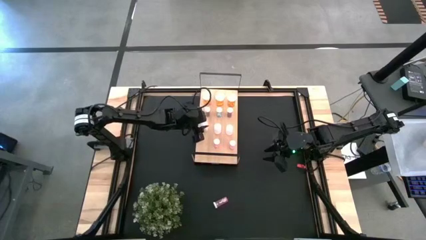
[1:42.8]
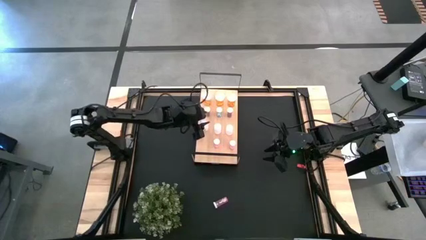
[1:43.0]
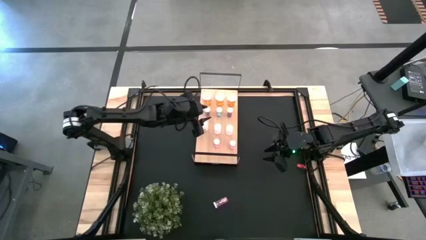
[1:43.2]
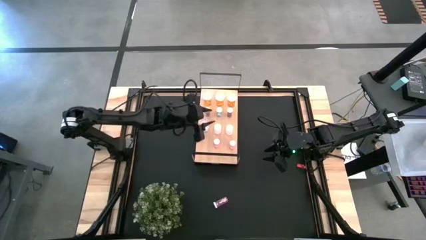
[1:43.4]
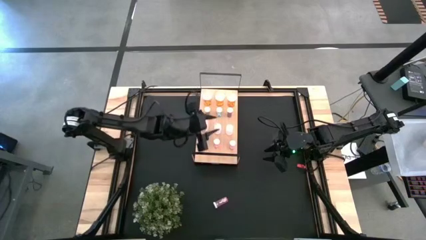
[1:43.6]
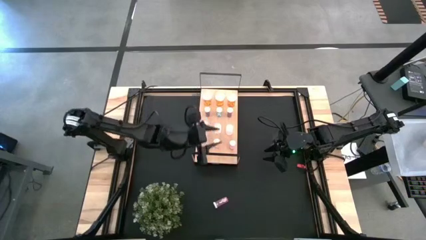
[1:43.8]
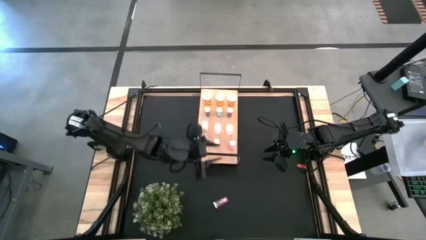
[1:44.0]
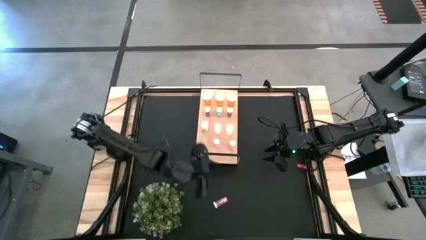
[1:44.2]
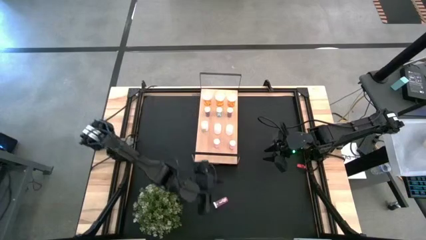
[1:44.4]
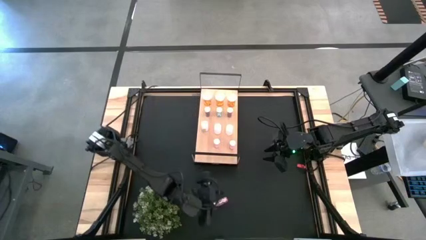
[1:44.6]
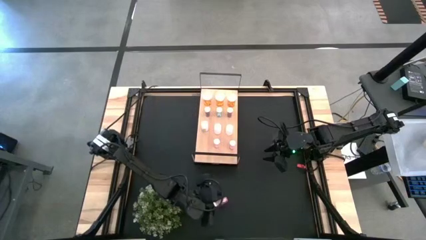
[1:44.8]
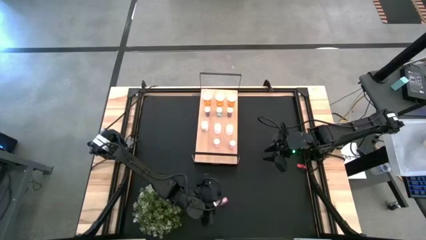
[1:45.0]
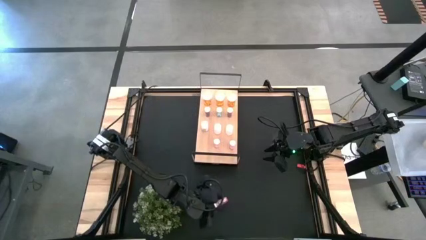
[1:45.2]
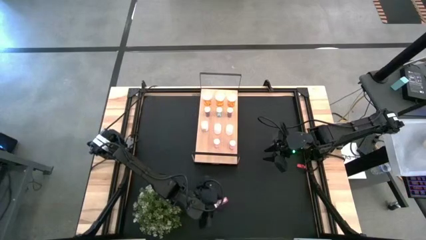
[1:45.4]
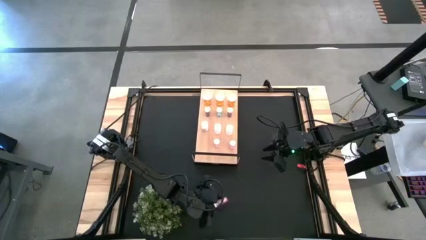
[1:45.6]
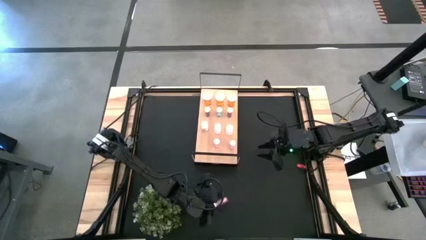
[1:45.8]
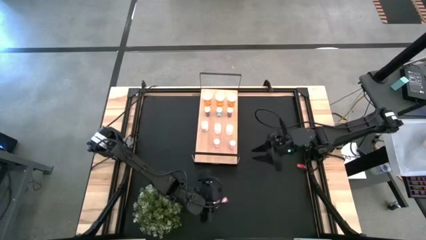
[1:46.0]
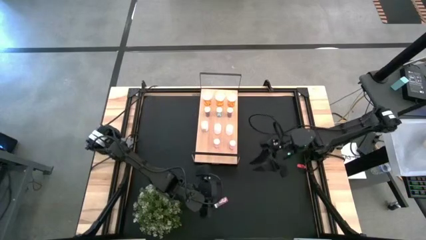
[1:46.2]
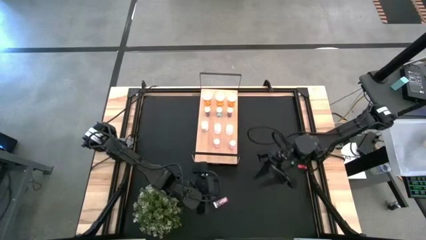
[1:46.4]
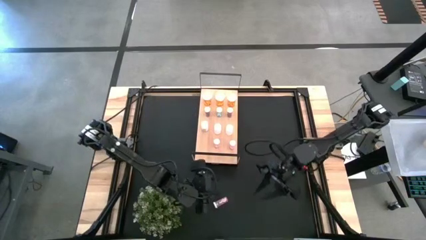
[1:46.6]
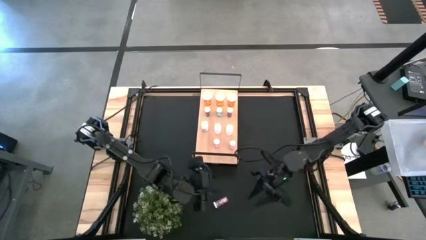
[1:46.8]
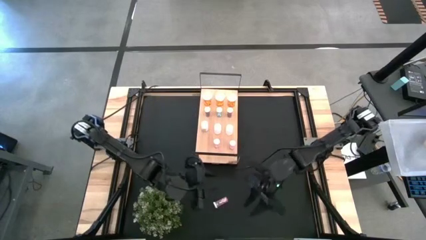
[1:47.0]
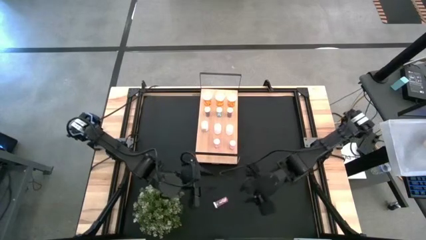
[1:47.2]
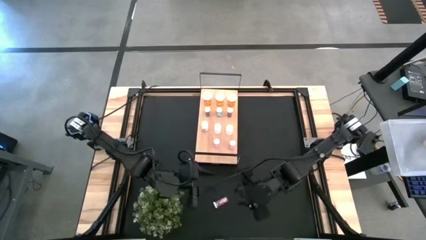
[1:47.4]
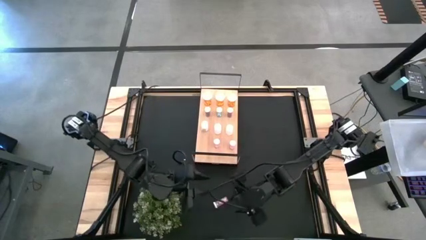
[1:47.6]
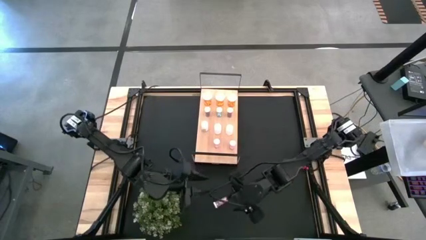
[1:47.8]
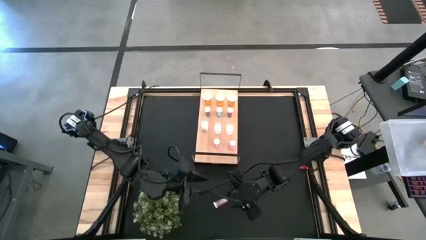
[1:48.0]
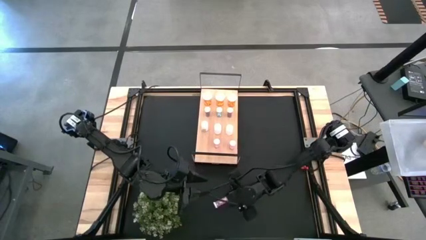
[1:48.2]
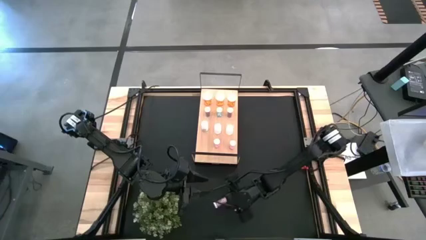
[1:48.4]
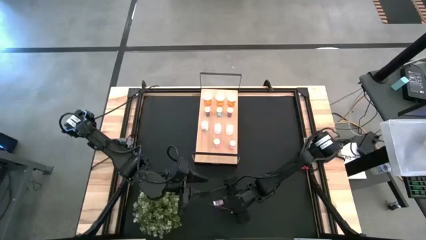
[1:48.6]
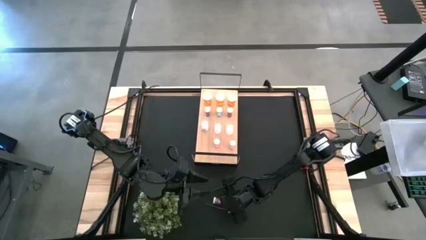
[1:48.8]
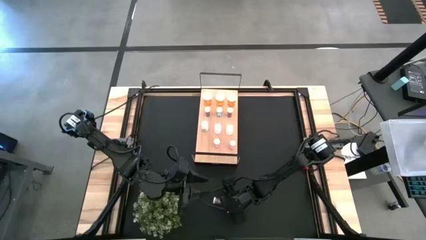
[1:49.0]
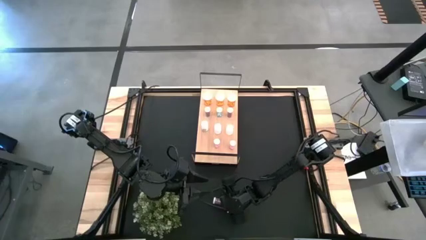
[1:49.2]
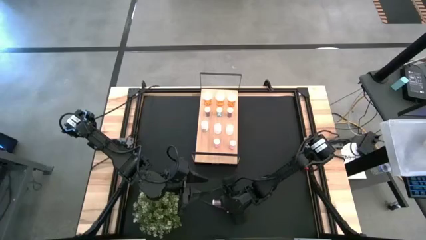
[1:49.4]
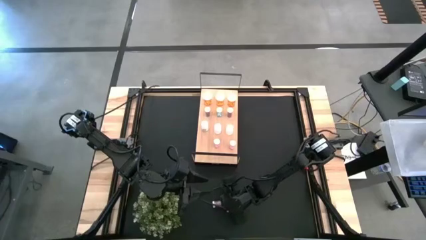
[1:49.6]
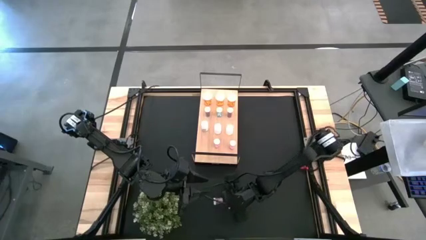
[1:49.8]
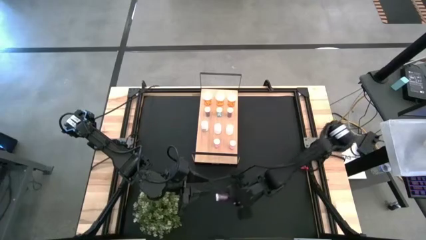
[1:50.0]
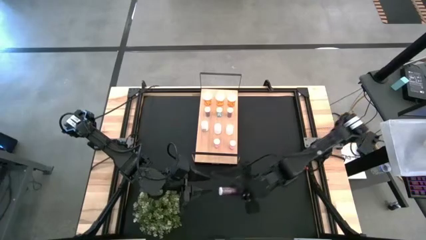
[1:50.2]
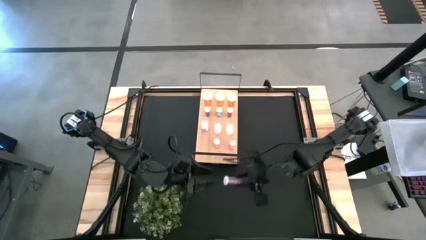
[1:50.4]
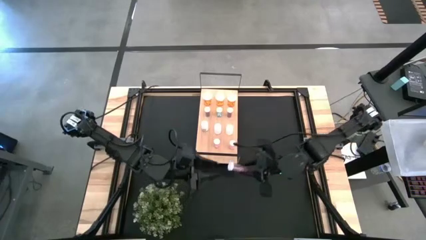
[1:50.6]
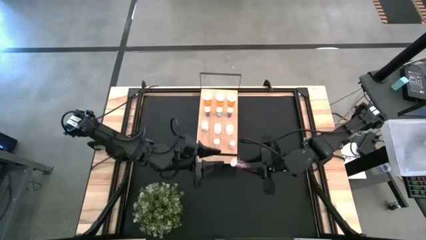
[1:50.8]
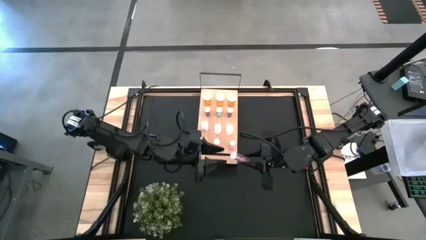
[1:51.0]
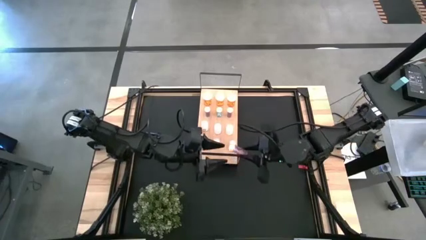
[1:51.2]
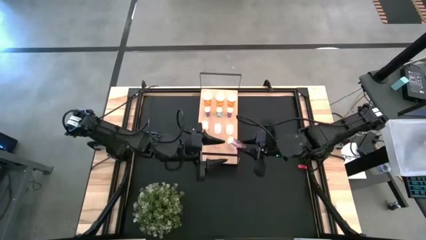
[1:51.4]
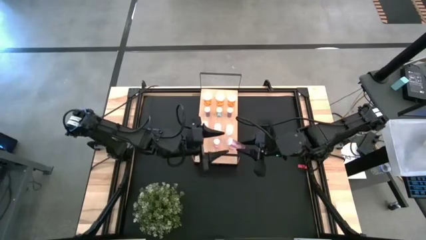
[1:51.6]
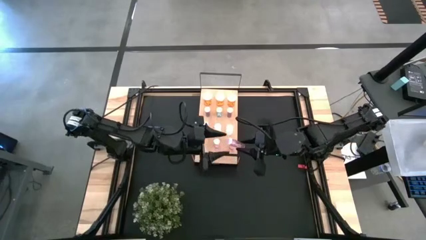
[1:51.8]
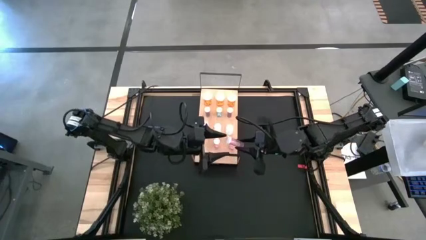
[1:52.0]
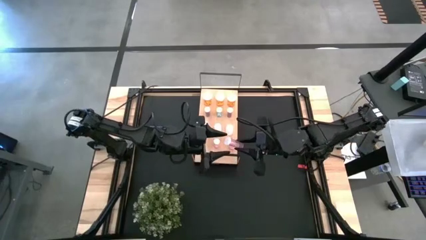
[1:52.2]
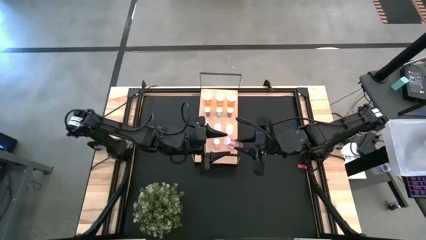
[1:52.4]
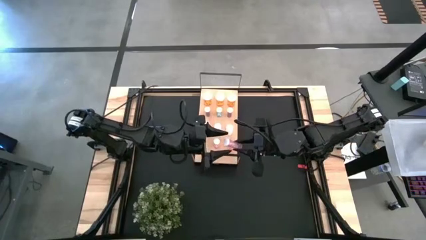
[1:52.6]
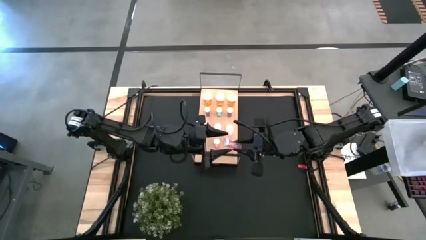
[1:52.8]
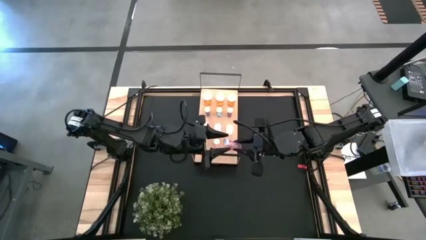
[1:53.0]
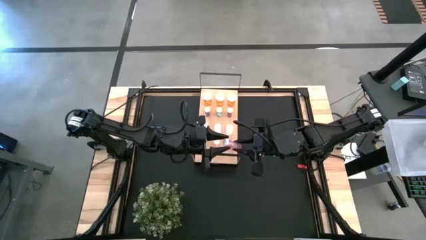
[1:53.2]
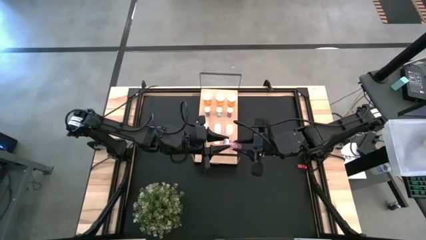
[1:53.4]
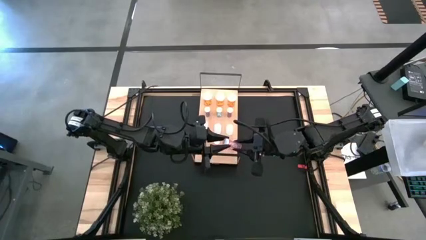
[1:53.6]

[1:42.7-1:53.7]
Task: Pick and place medicine bottles onto shelf by color
Put the pink pill bottle aligned with the other pink pill bottles on the shelf
